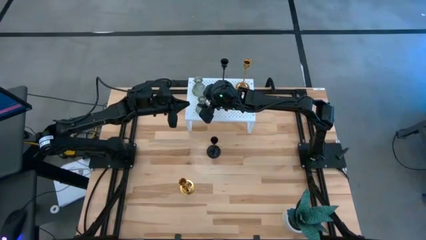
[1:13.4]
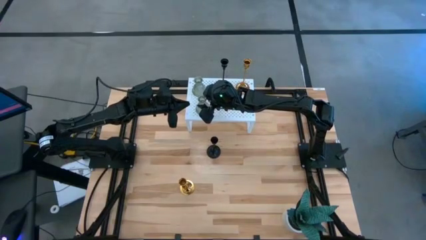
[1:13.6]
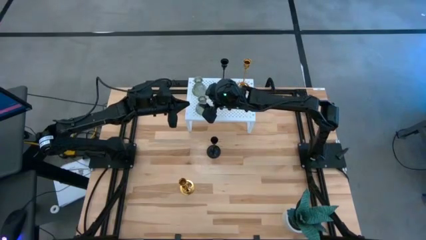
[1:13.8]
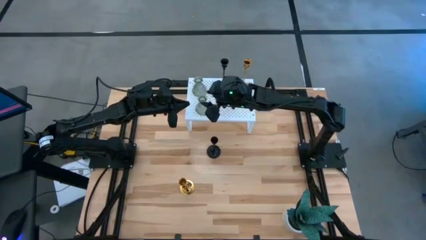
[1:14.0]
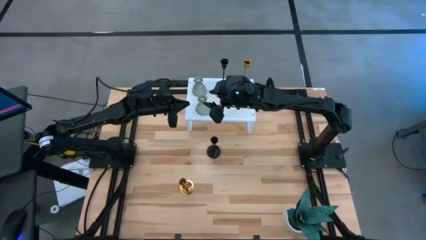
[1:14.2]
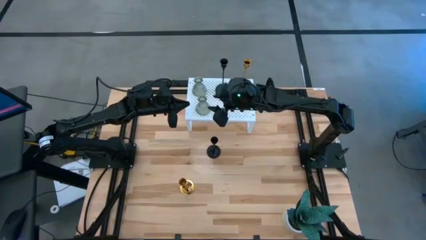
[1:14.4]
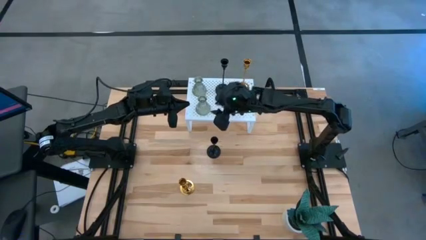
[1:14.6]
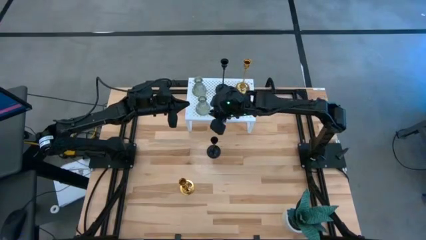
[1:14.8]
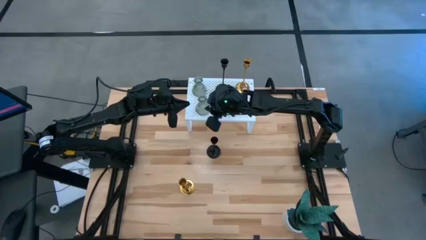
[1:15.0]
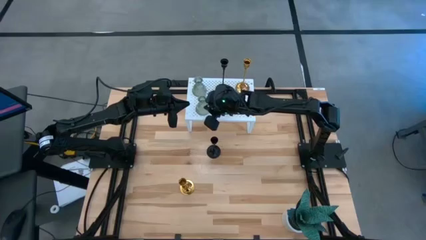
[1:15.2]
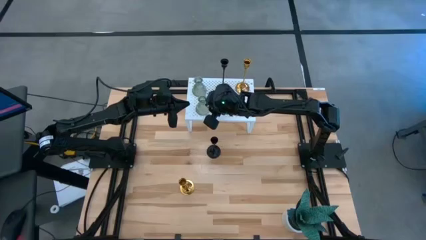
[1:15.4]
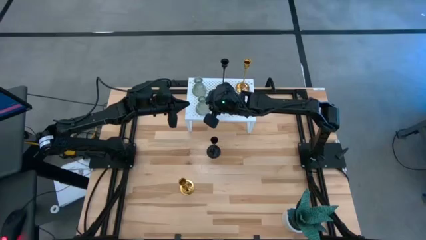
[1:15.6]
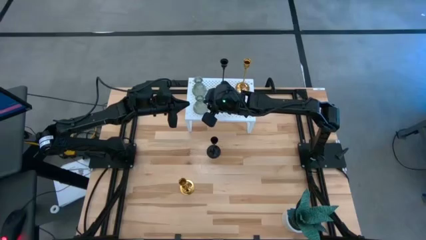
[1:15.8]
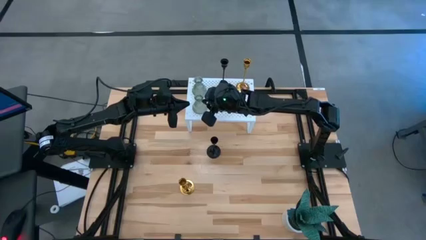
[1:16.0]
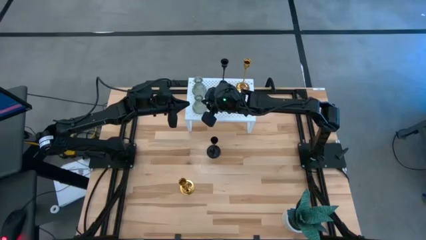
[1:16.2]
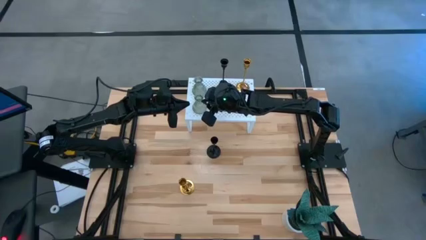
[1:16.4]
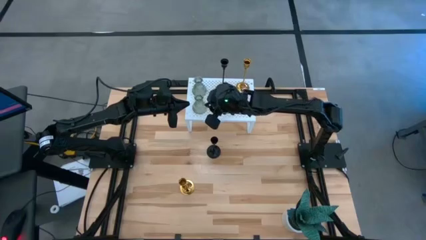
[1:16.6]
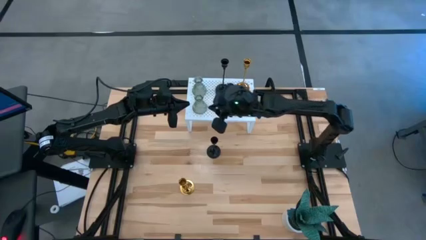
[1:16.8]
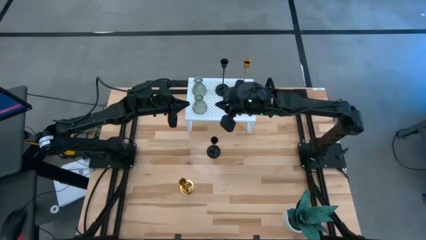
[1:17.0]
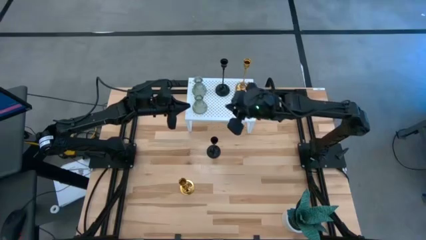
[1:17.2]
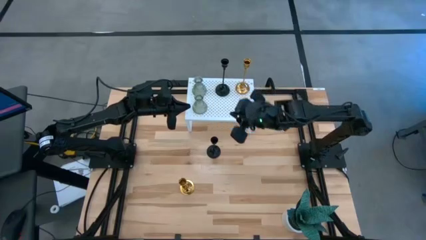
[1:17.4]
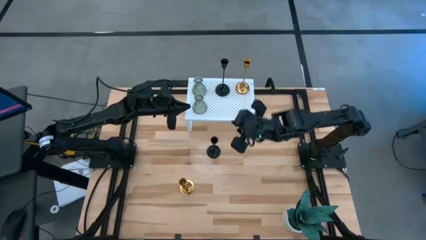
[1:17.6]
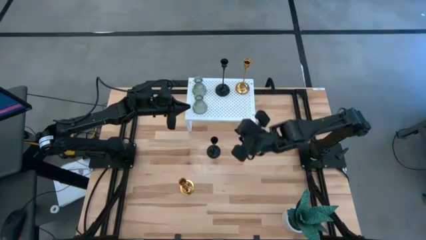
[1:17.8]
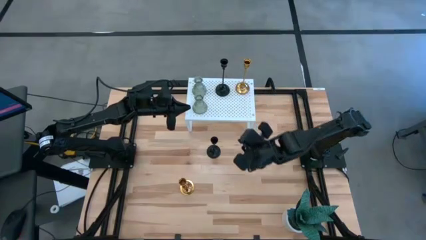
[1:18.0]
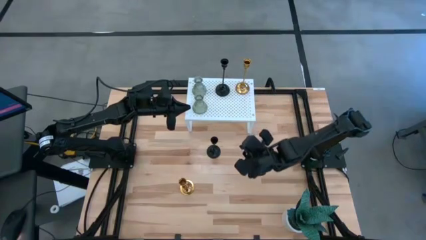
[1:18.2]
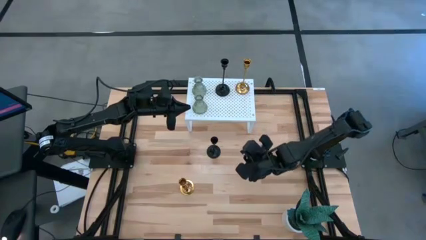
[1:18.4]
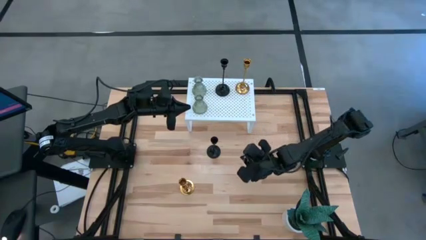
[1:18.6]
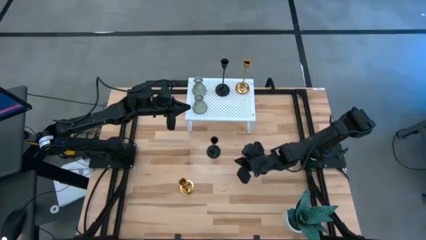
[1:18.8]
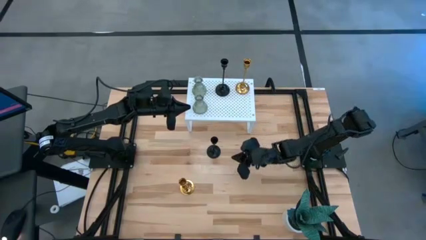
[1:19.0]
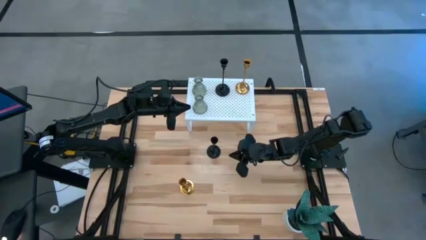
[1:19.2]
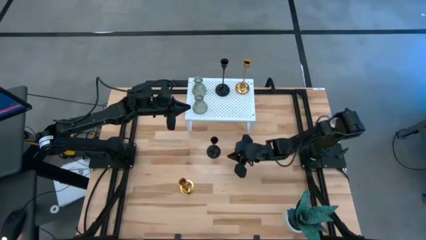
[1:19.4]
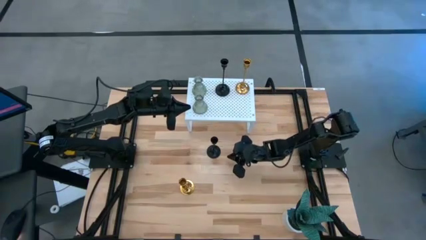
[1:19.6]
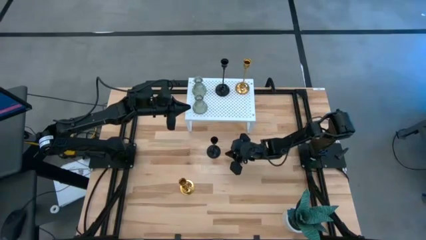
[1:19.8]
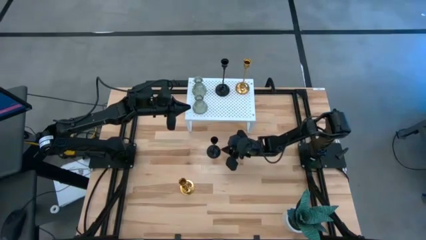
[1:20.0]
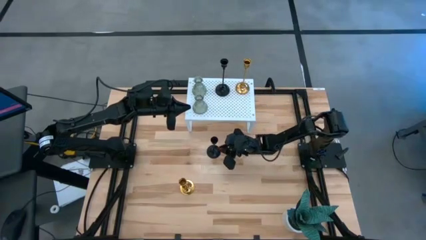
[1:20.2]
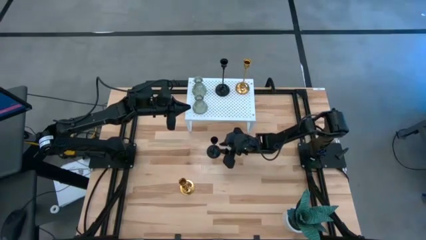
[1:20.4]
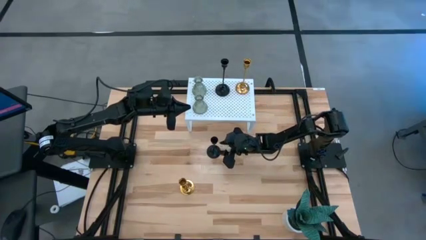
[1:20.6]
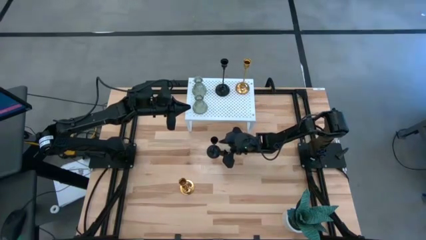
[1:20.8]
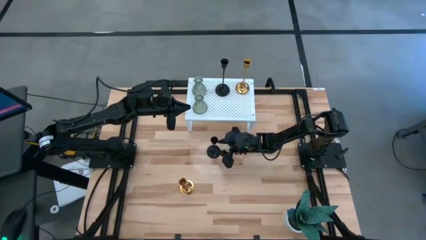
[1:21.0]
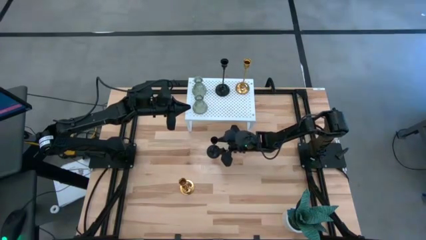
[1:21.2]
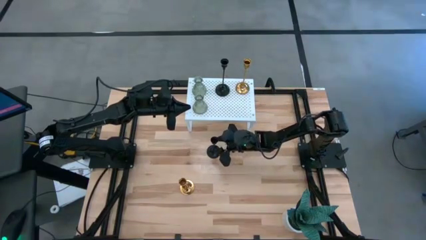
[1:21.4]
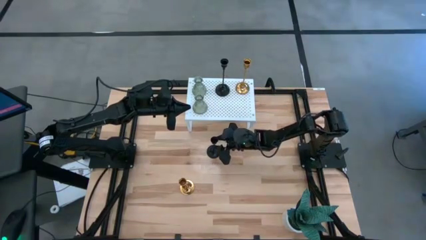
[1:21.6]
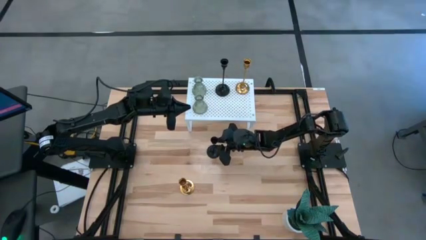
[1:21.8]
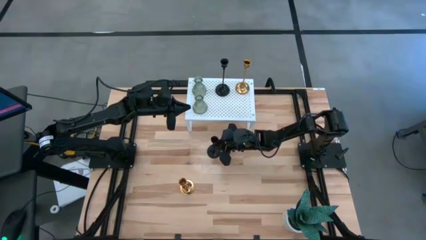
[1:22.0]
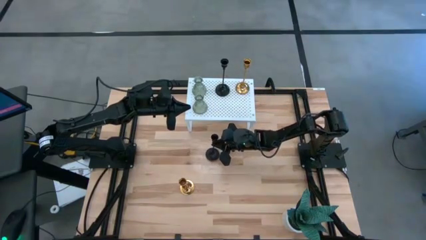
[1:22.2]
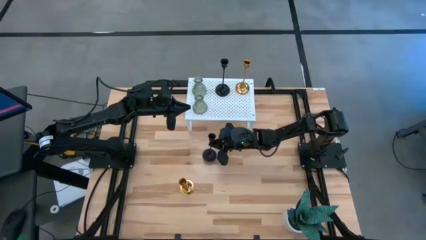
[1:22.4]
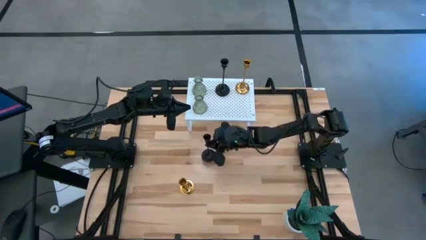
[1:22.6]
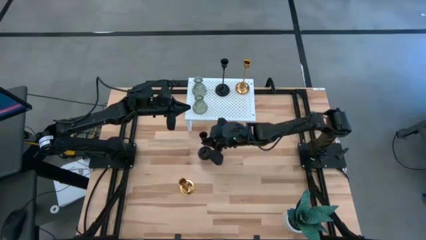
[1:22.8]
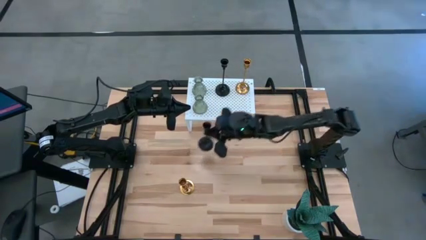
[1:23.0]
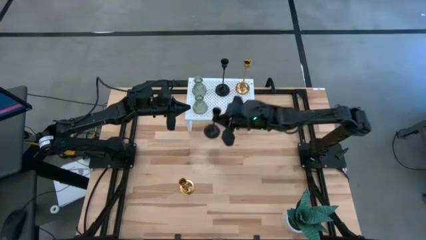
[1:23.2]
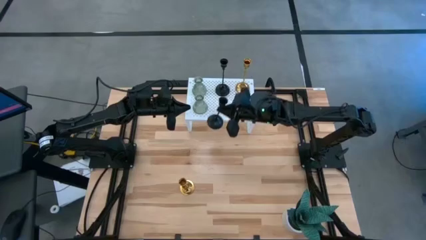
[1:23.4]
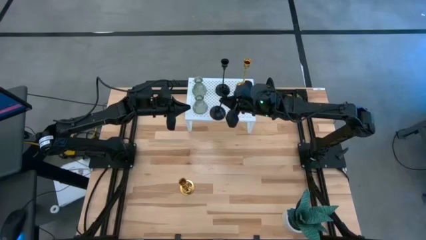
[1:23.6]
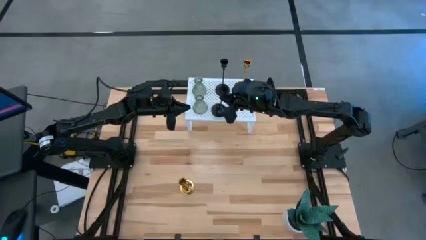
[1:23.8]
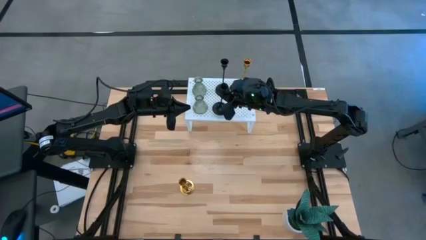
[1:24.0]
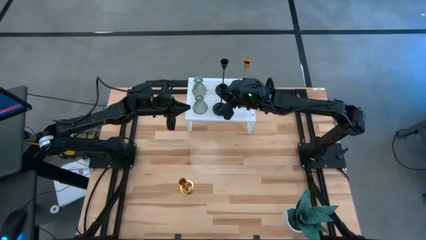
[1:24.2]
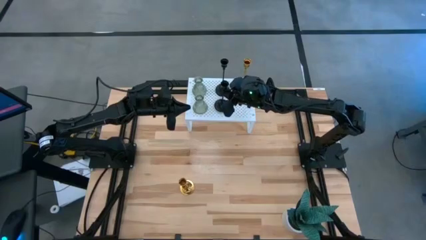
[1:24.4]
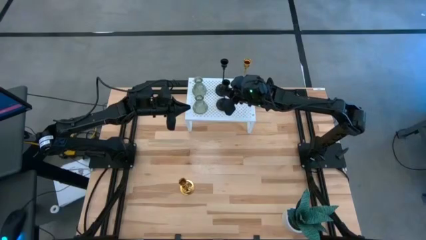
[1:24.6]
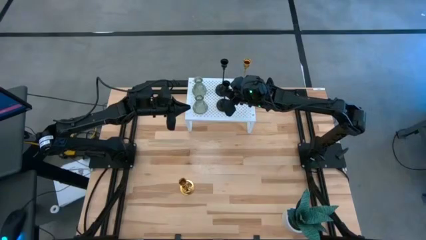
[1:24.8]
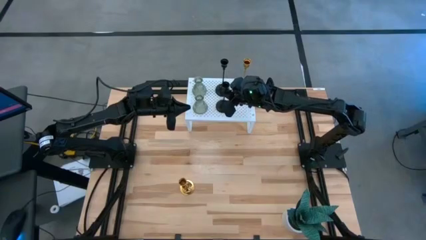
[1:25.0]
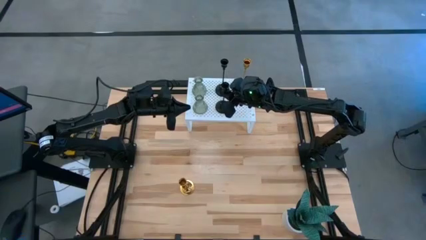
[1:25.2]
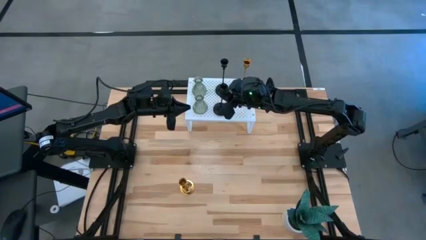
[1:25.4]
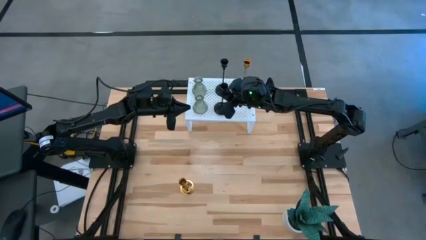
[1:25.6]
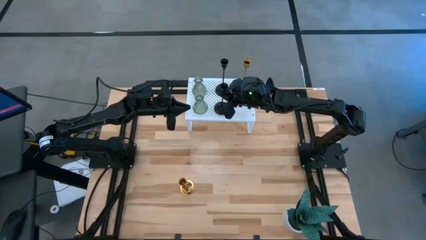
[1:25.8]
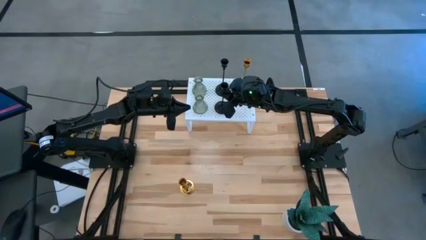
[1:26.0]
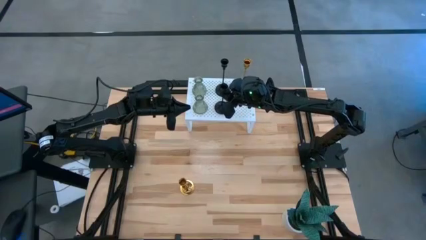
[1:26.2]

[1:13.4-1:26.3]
Task: Pick & Place candle stick holders
Align the black candle holder with the black candle holder on the shelf

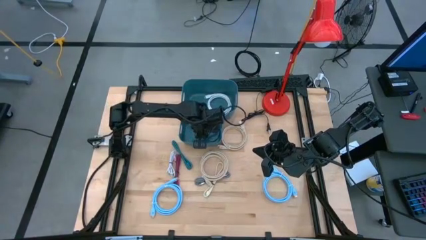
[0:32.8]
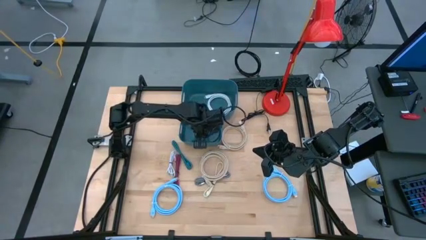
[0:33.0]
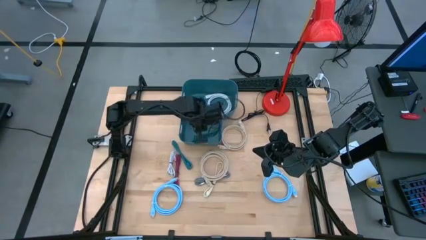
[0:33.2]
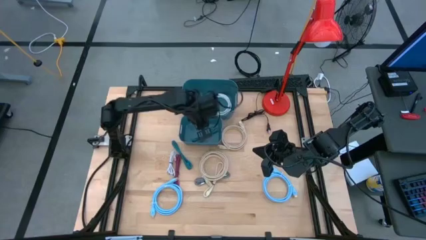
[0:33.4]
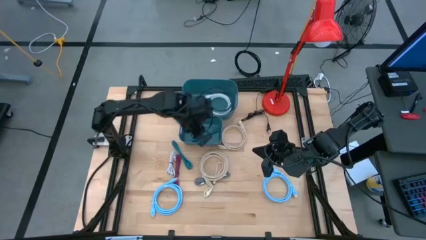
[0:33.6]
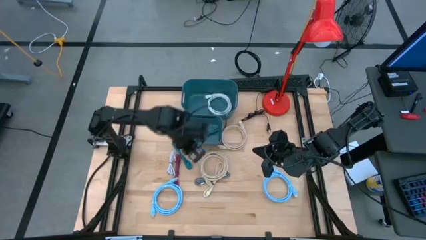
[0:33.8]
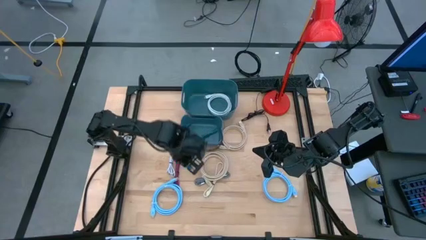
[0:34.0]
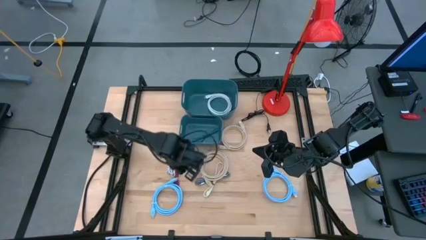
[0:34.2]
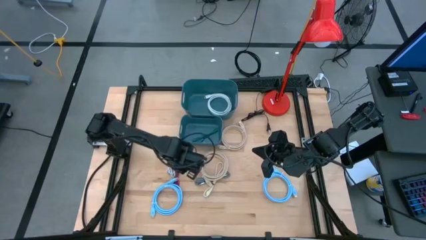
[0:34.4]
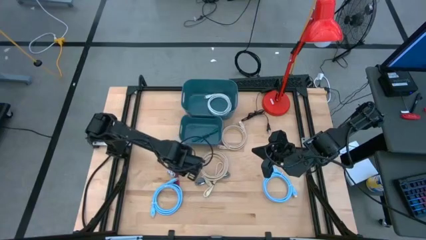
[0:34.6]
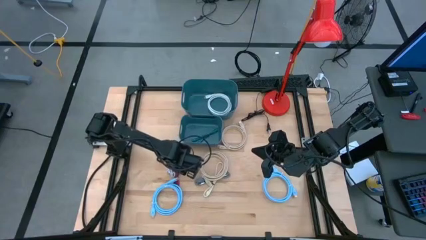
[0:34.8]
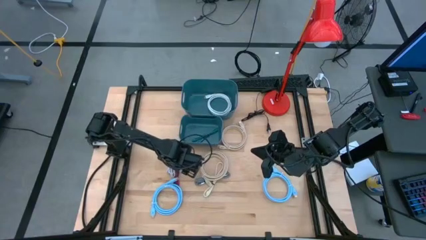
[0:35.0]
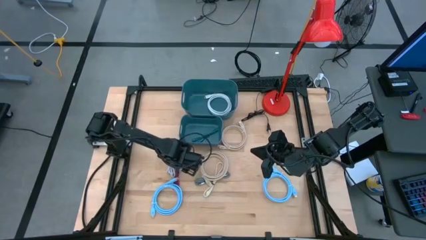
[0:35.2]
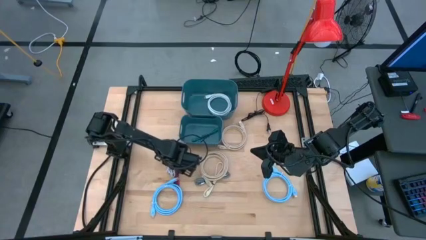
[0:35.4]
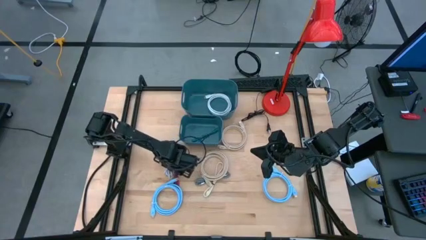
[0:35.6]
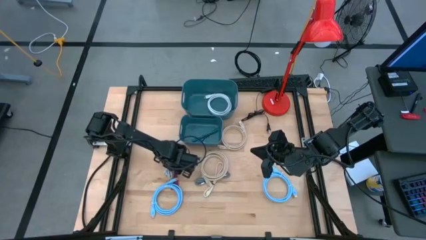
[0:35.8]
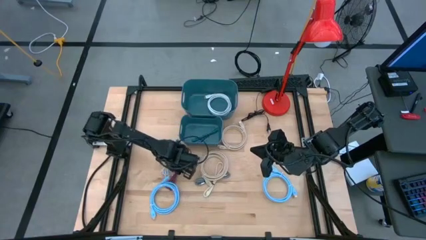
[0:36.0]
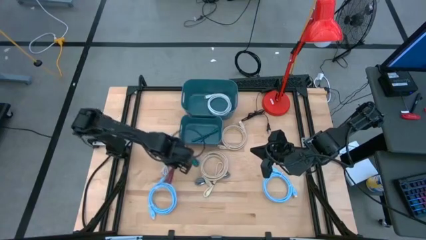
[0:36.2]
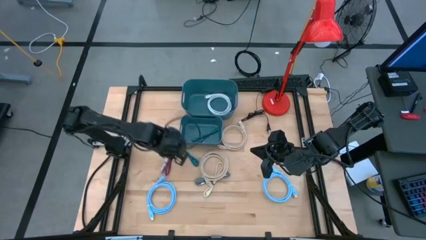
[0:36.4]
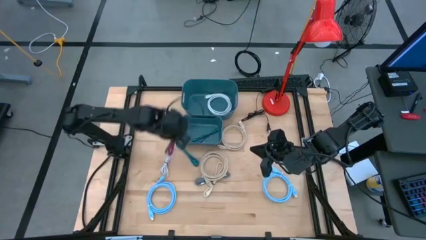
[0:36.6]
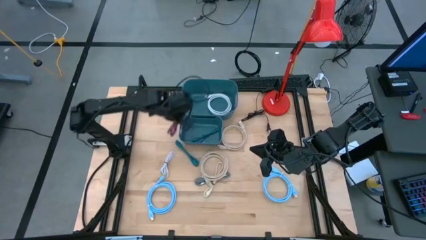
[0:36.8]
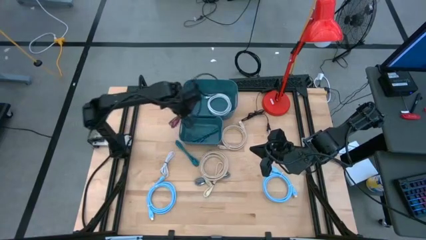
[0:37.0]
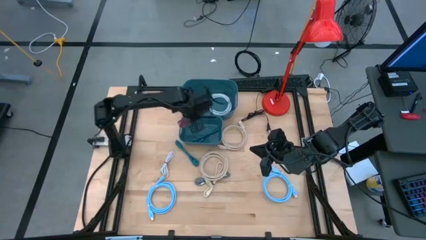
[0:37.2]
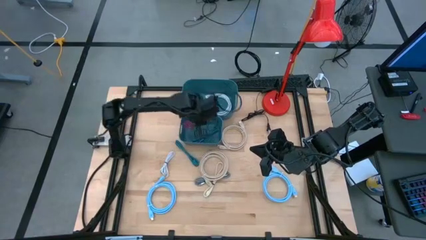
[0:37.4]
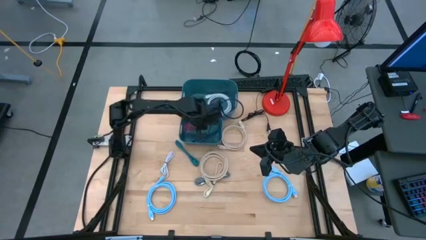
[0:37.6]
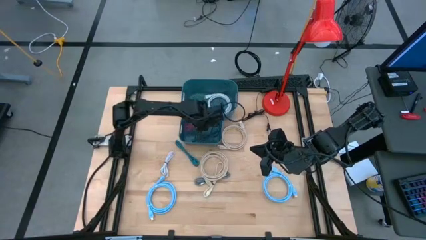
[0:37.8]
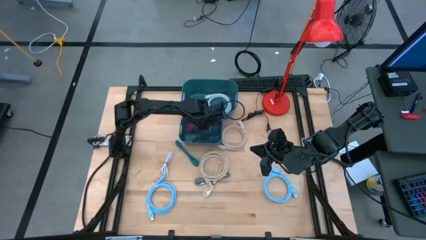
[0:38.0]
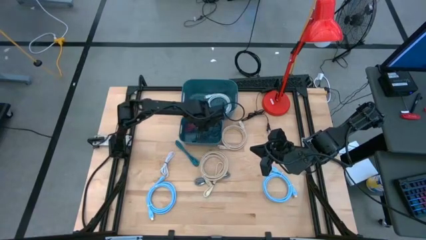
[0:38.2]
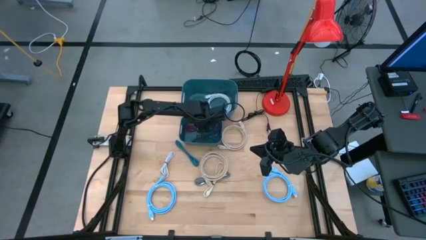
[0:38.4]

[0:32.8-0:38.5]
Task: Pick & Place USB Port
Put the pink charger cable into the bottom blue bin
